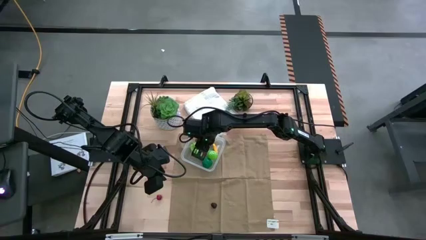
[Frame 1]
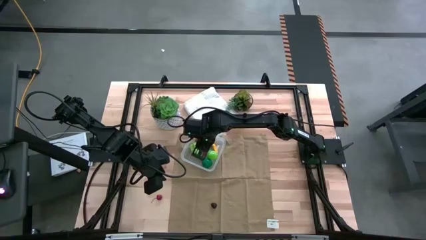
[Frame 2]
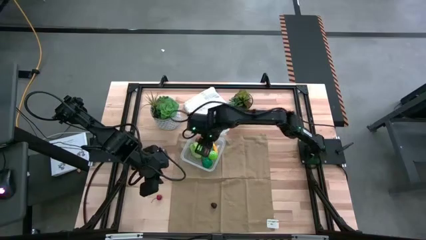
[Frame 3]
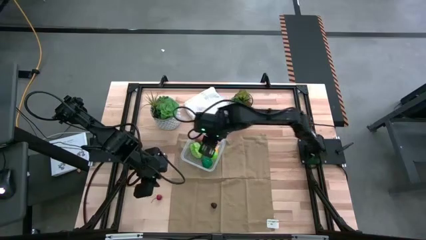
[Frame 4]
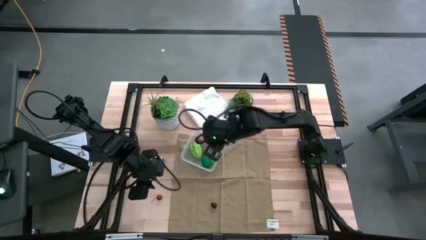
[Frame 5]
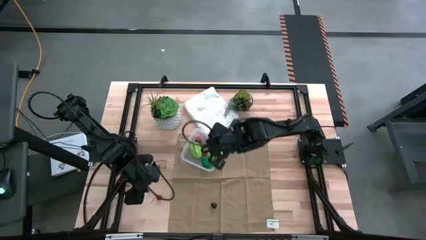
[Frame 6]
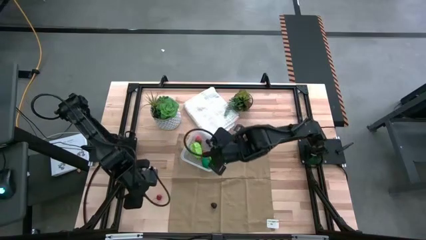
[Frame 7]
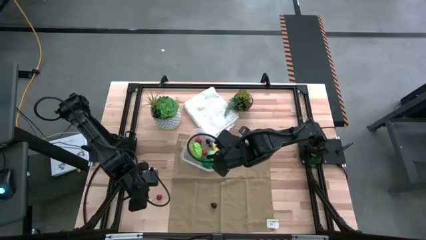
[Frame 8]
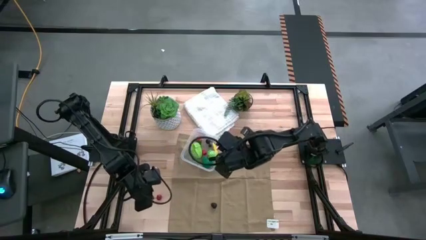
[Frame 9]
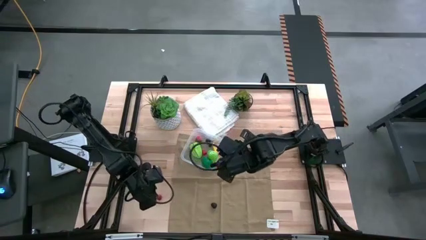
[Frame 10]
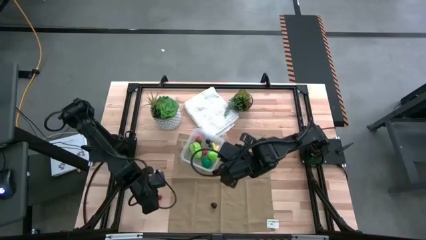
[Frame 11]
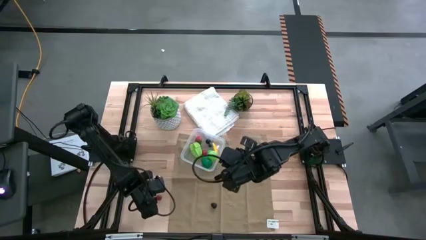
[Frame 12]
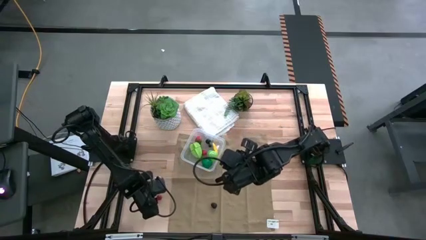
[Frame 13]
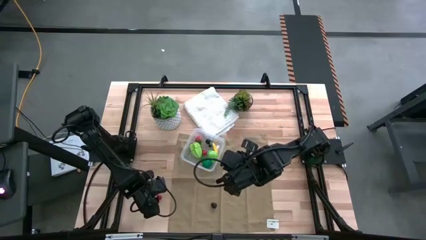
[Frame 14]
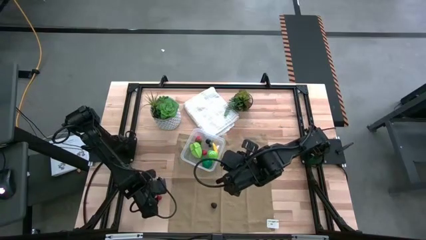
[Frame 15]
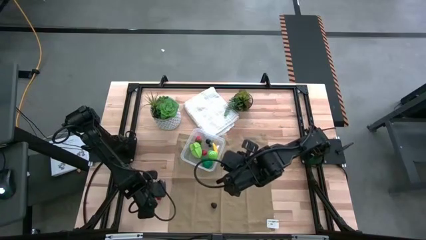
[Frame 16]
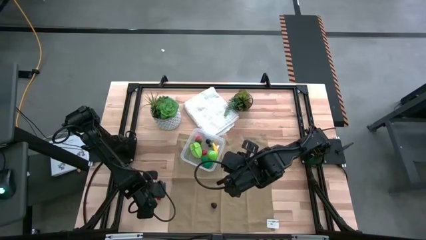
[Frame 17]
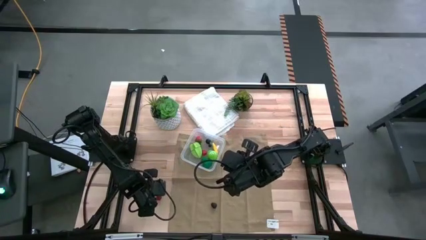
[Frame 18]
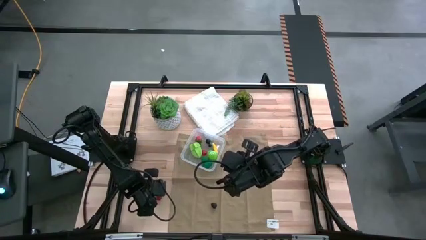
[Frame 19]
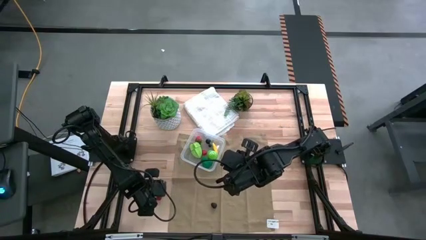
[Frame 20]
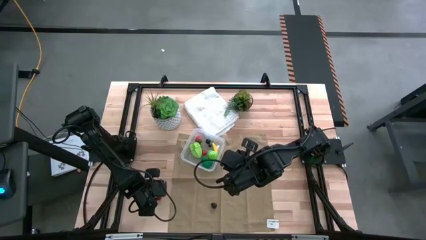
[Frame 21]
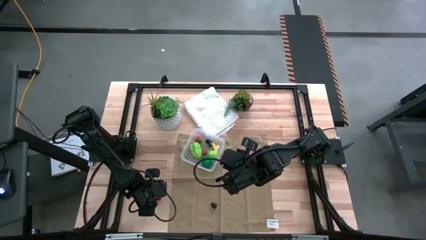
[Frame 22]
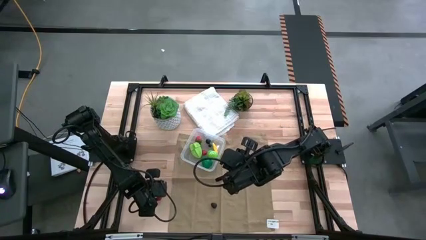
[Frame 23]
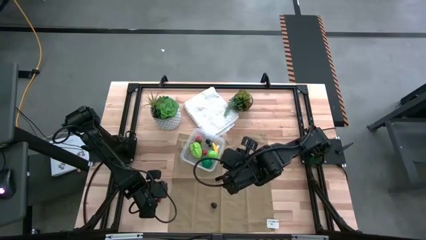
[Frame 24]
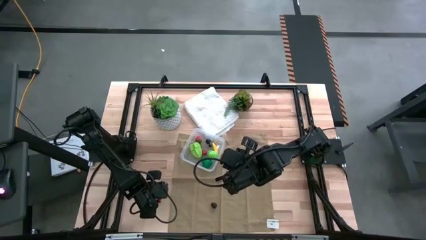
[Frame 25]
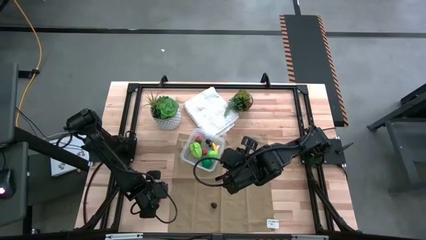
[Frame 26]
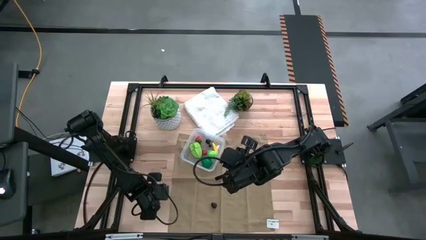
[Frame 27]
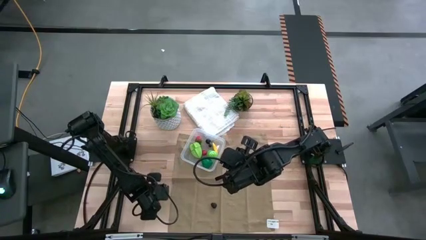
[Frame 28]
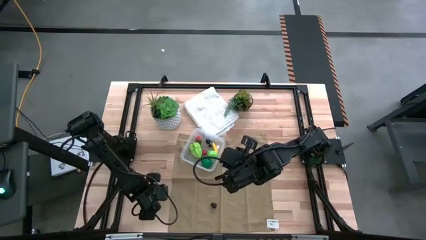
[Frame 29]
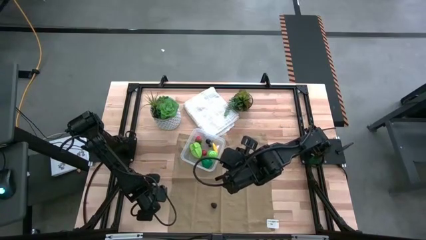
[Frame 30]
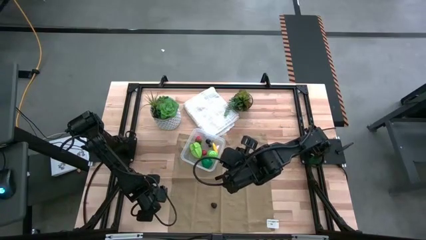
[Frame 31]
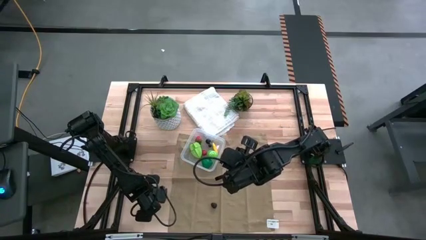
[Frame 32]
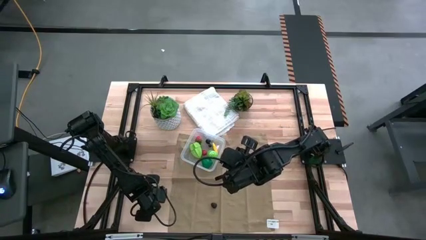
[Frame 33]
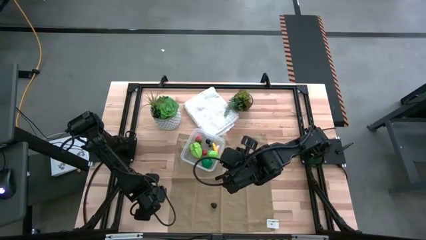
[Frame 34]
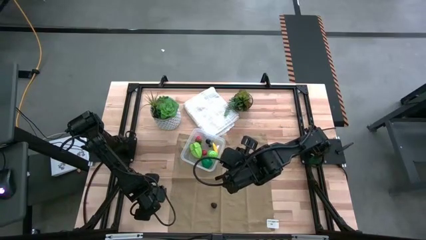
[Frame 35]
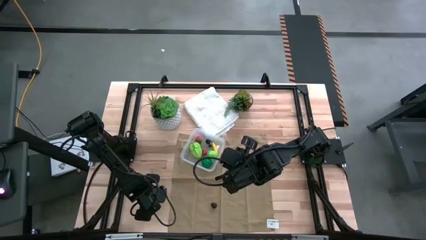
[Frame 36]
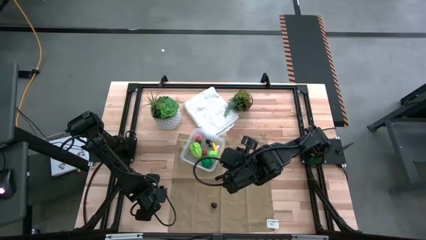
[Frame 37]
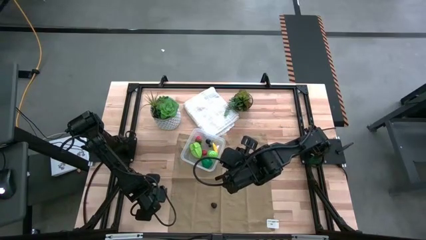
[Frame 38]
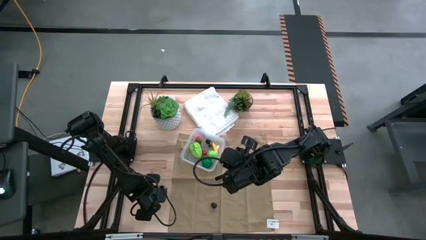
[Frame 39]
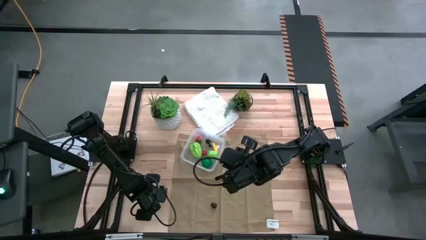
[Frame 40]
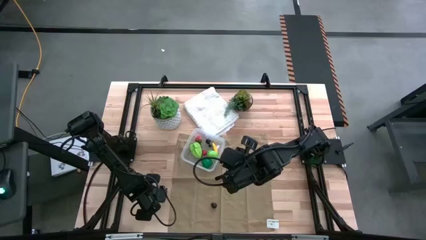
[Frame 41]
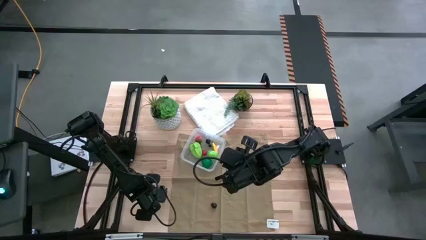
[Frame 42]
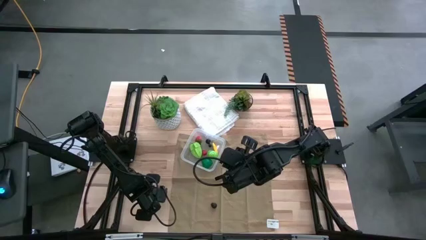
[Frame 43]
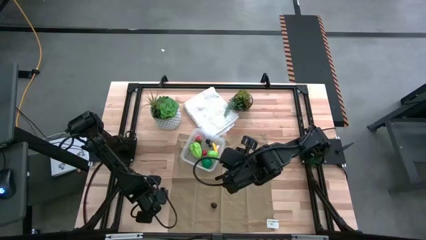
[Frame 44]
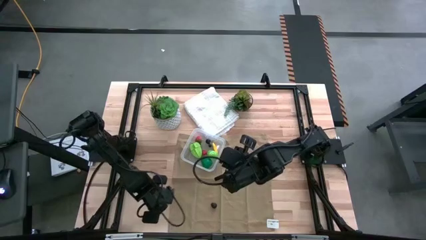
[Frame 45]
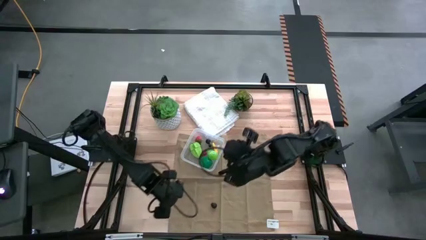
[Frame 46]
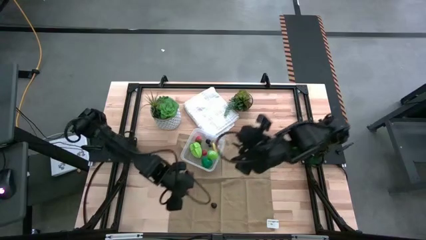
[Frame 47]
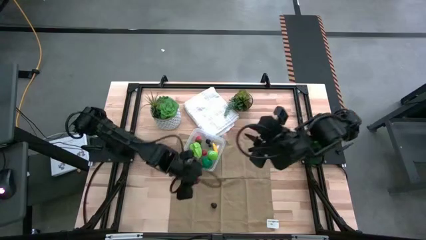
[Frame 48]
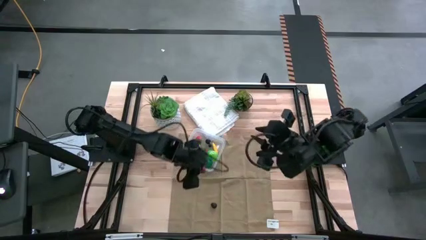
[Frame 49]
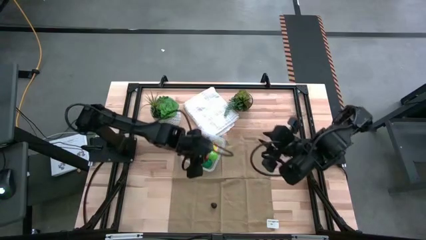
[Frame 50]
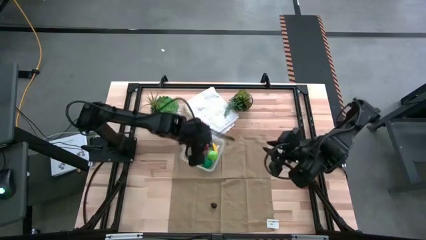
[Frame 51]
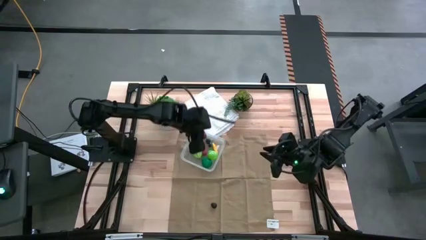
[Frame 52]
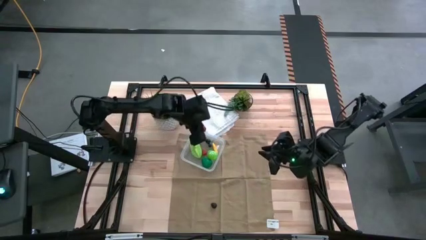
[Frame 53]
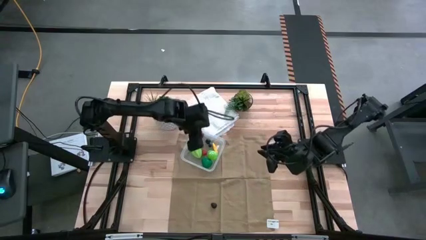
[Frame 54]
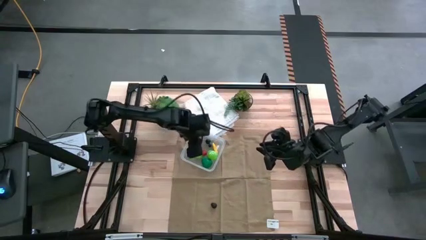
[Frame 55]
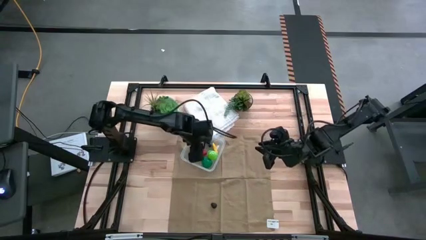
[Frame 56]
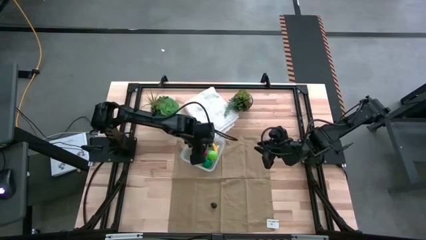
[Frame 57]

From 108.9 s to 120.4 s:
Task: Pick and placing Produce into tupperware
Put the red cherry into transparent bin
